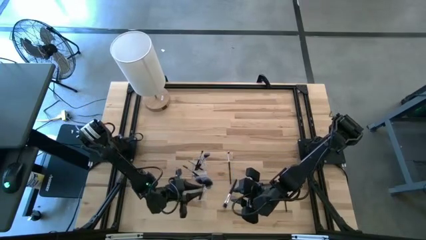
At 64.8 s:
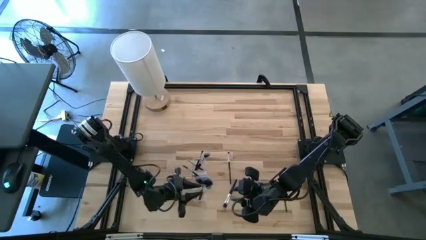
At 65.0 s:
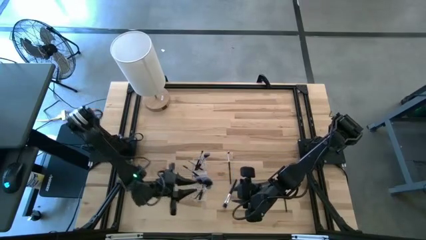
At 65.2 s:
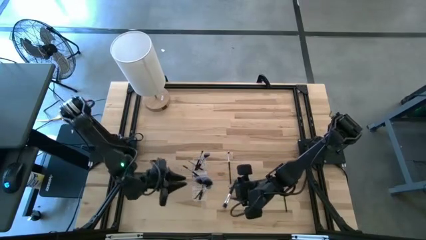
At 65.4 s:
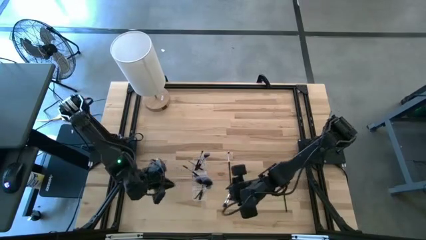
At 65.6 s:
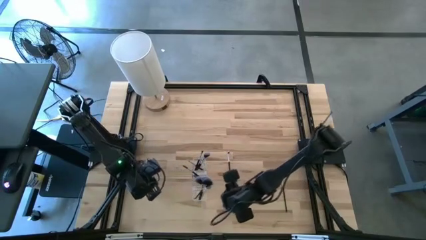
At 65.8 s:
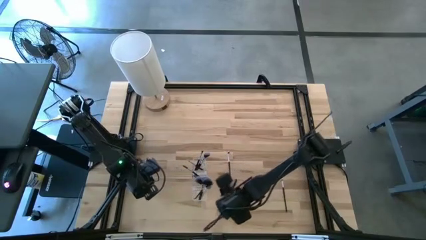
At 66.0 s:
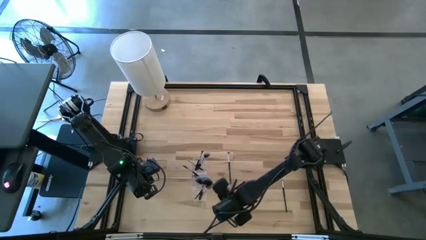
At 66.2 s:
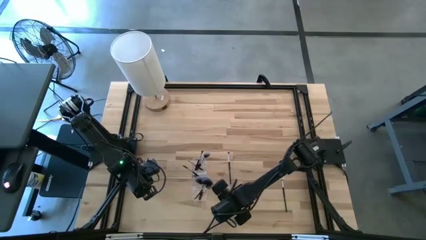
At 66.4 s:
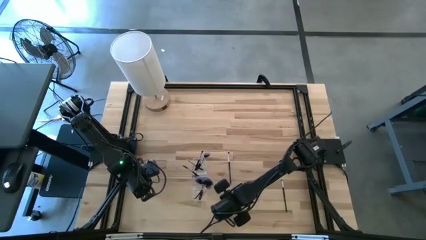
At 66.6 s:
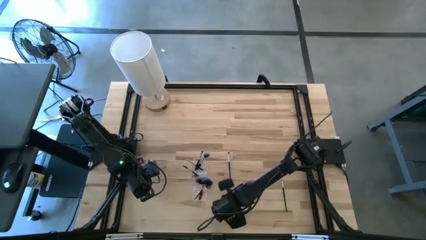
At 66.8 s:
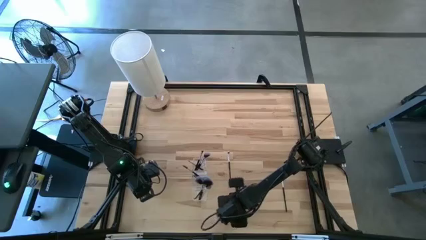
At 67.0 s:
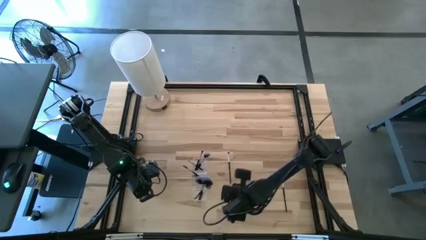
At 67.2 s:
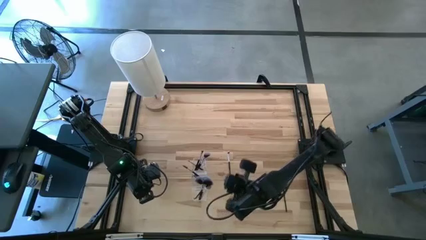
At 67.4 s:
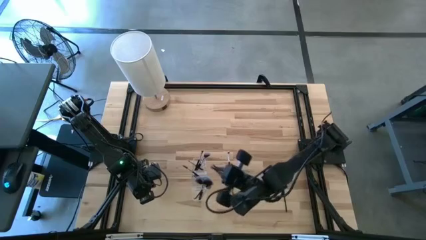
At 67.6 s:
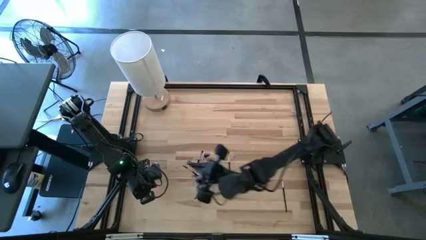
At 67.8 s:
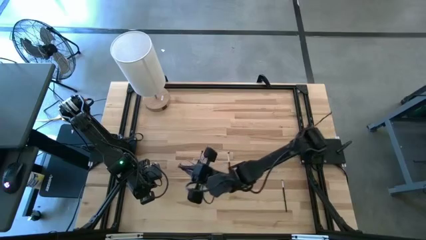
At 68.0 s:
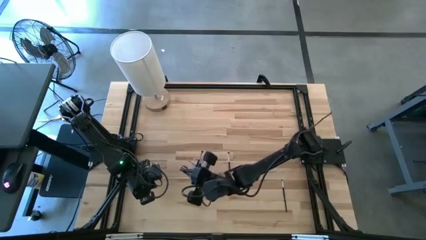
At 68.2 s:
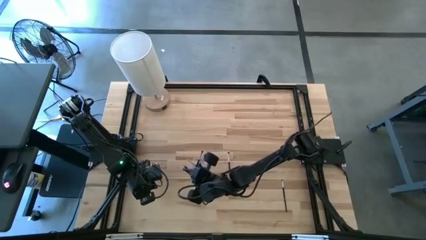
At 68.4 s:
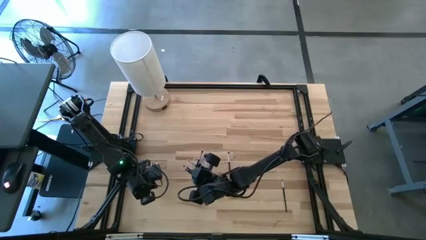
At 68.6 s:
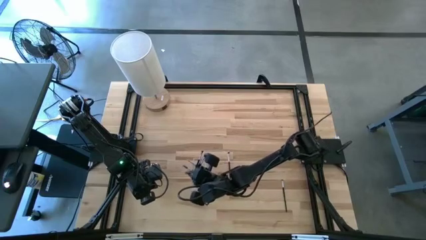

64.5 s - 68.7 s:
Task: Put items in baskets/containers
Put the blush brush into the transparent organizer

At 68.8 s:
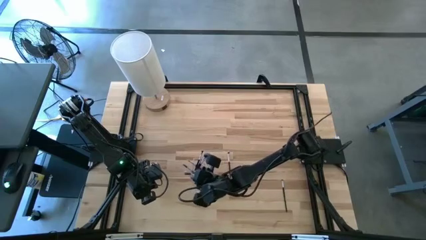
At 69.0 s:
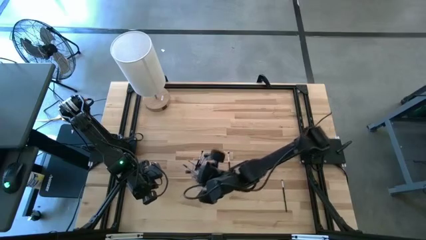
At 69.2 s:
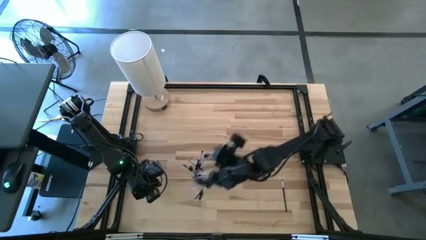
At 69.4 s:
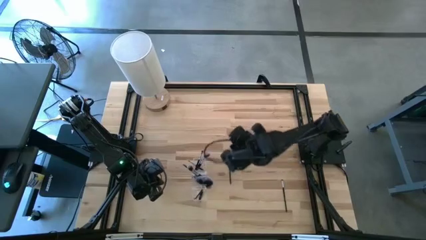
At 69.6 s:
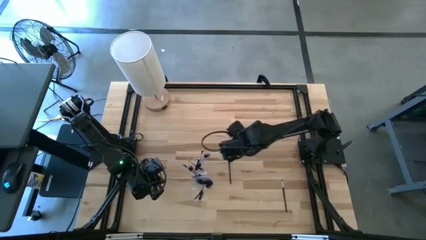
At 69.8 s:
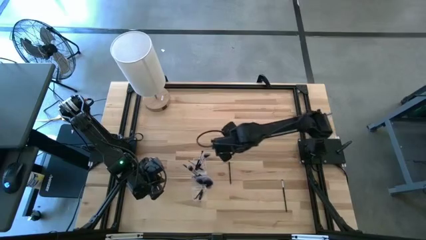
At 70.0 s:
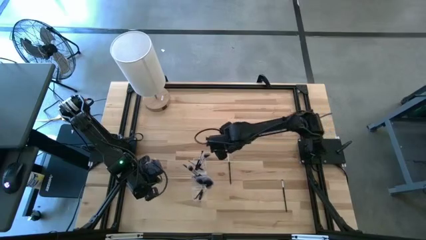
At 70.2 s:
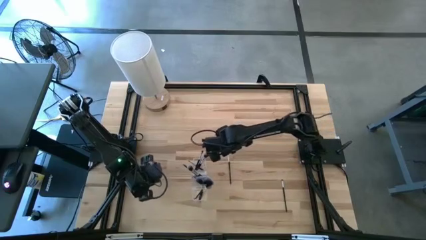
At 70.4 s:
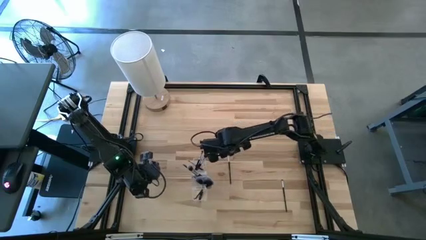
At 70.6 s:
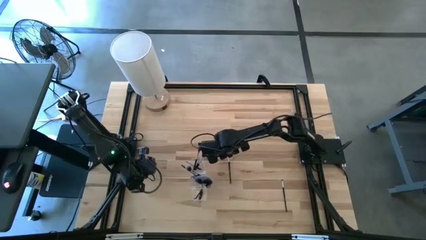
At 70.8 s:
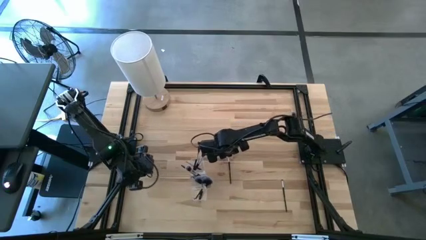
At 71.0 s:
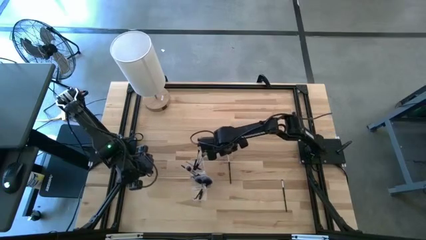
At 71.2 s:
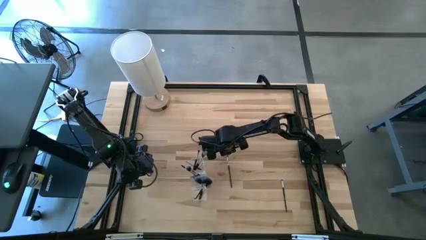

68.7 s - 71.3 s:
Put the foundation brush into the transparent organizer

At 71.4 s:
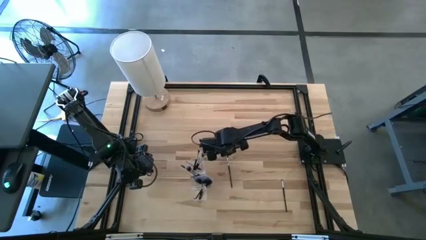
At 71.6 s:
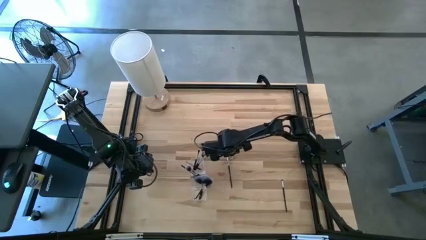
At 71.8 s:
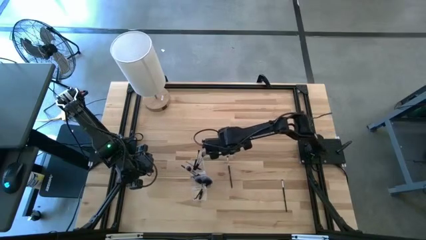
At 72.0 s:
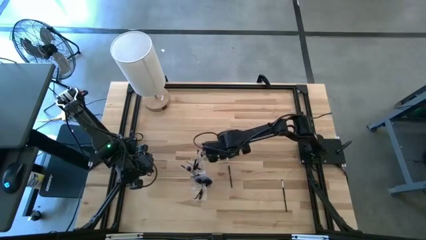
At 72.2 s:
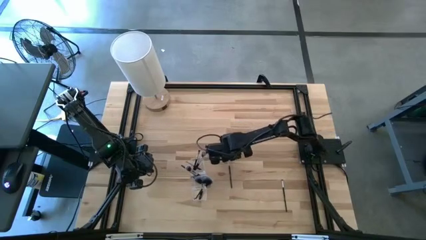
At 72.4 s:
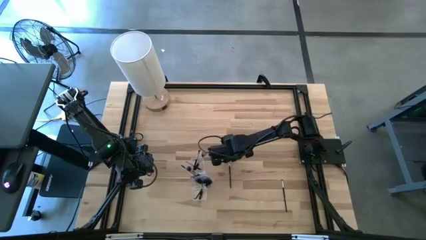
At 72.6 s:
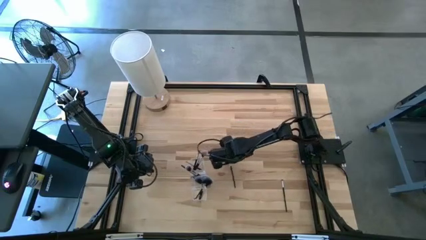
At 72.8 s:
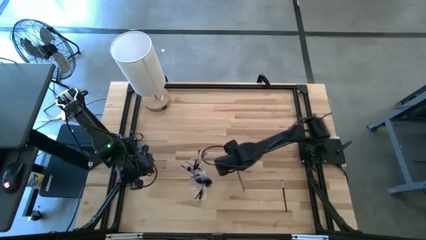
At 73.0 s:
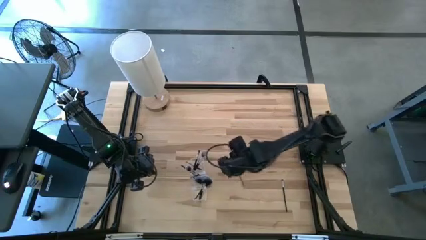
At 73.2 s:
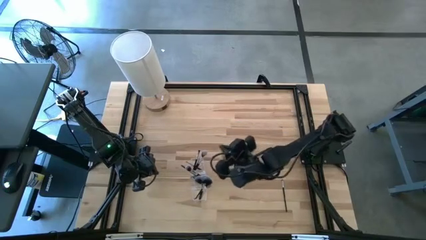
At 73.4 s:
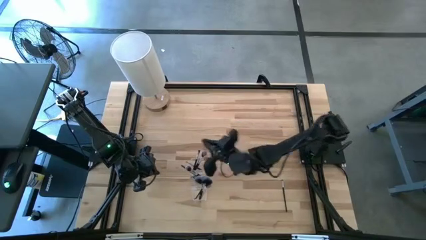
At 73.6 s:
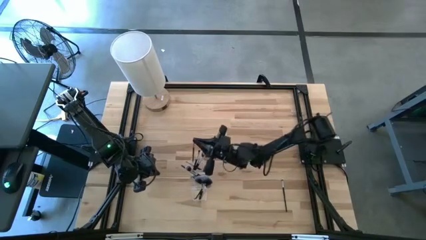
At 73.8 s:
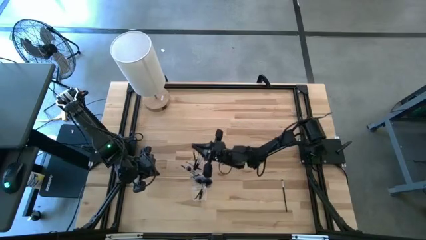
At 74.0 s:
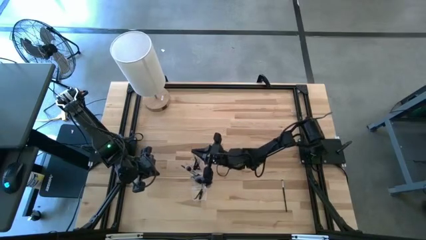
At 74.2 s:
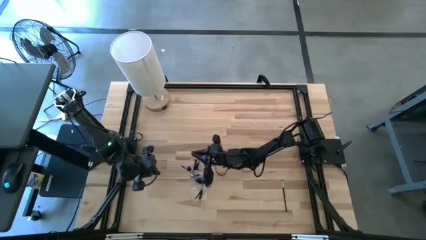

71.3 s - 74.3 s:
Put the foundation brush into the transparent organizer

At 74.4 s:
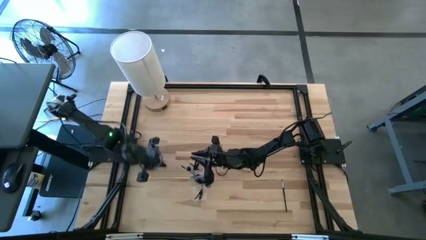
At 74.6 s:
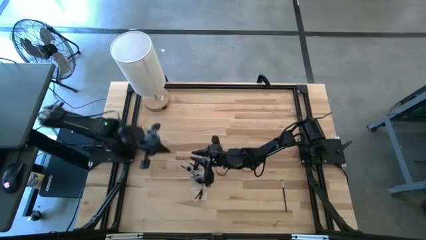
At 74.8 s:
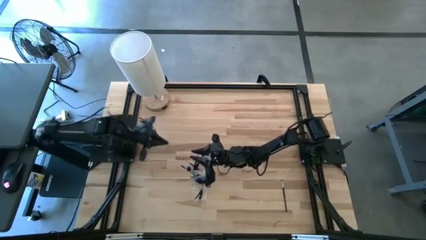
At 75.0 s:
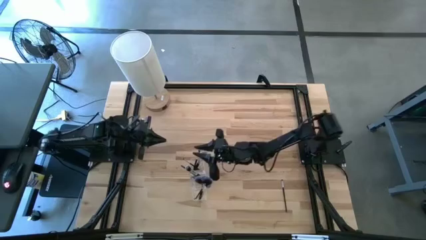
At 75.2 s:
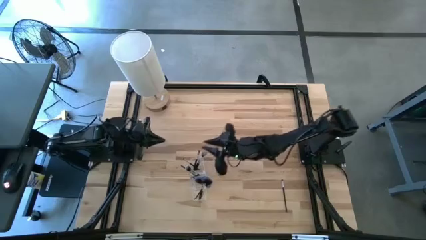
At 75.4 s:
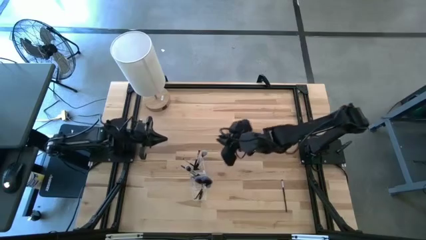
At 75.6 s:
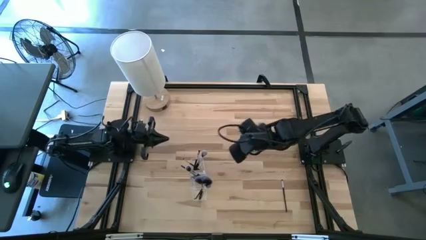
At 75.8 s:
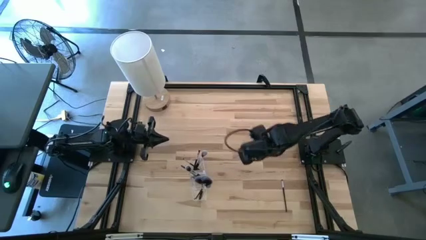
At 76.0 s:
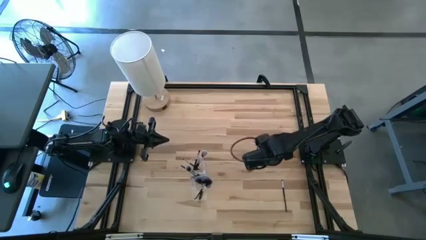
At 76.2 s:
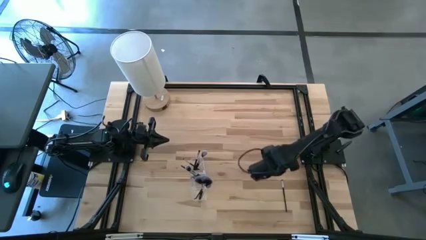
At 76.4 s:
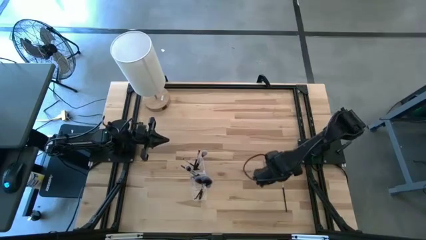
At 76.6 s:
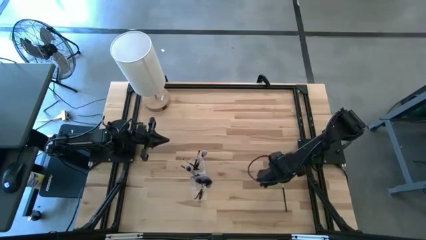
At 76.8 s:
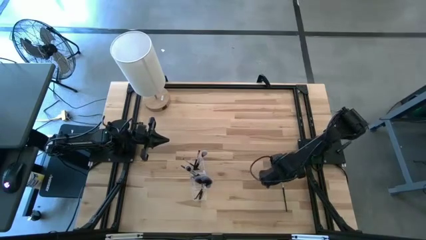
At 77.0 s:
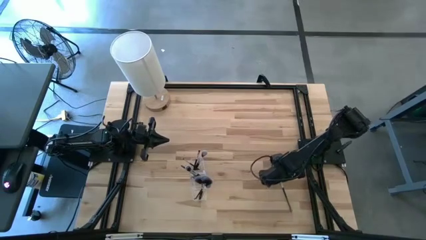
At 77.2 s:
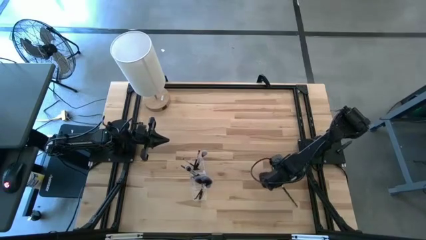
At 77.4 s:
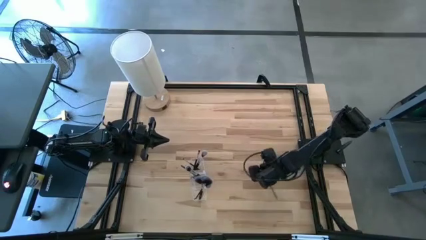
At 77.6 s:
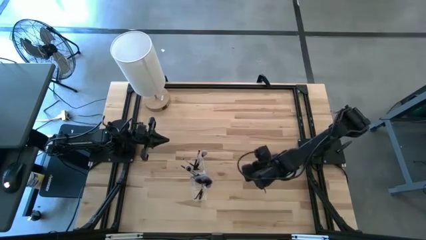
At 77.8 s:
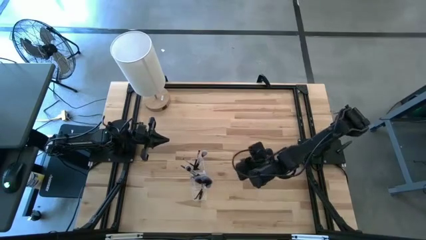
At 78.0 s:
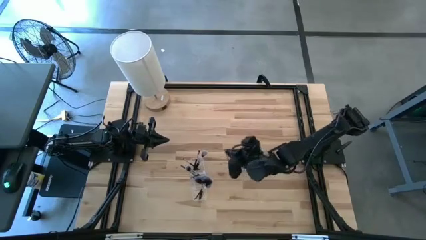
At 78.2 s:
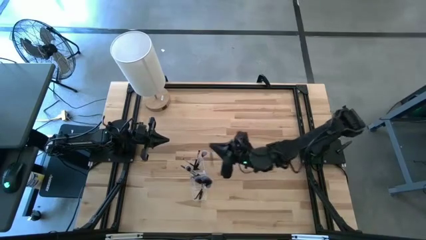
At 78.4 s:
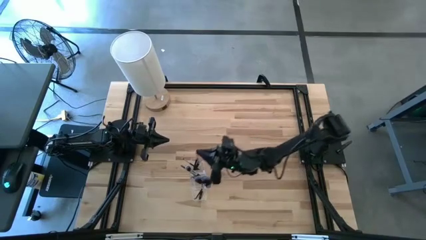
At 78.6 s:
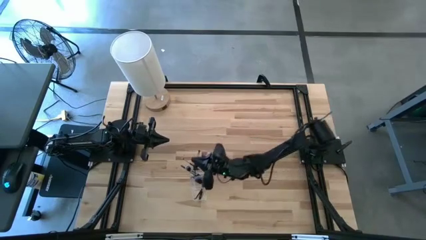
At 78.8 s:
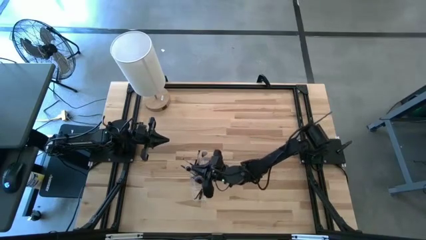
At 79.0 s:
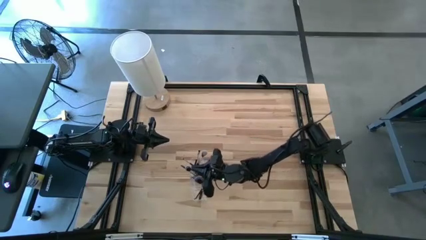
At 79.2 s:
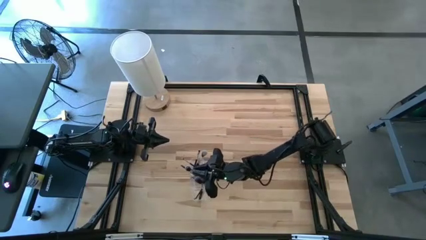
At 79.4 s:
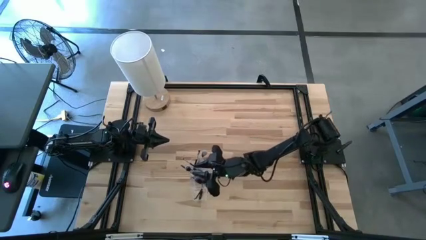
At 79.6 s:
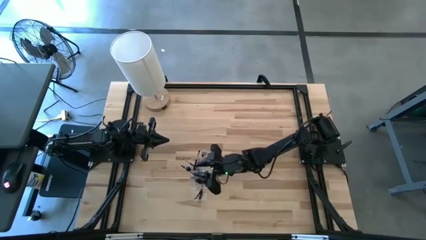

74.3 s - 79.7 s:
Put the foundation brush into the transparent organizer

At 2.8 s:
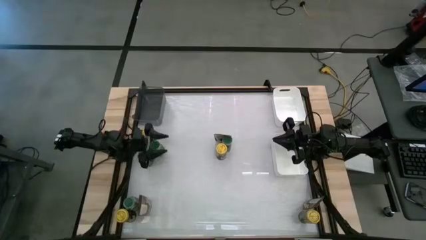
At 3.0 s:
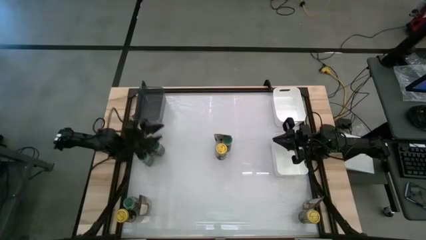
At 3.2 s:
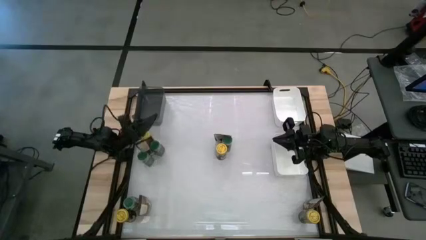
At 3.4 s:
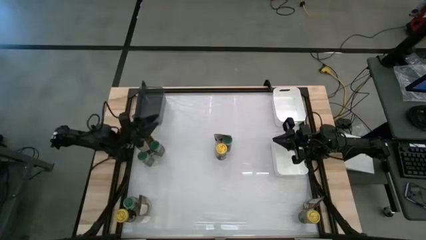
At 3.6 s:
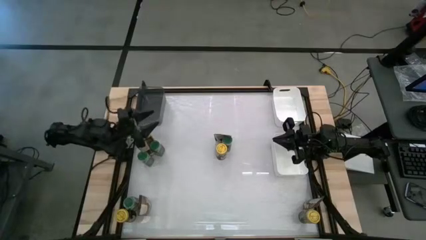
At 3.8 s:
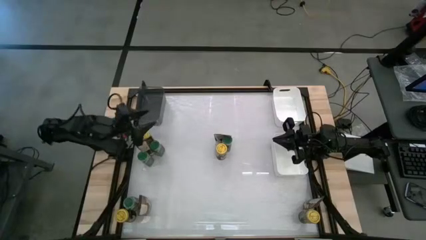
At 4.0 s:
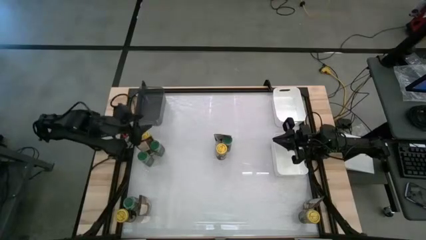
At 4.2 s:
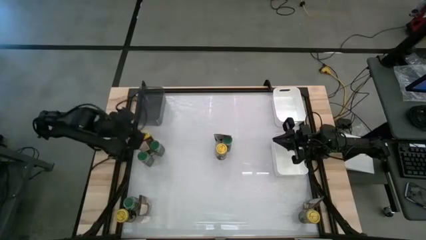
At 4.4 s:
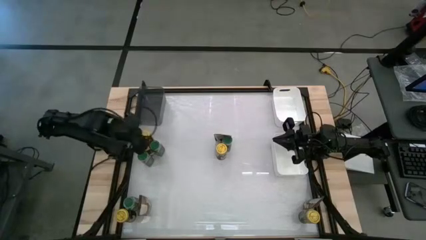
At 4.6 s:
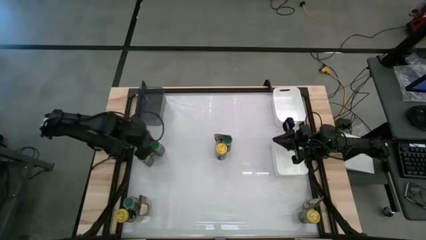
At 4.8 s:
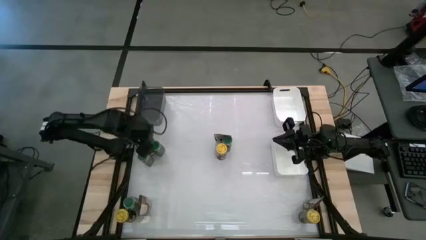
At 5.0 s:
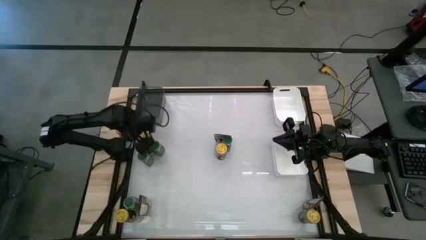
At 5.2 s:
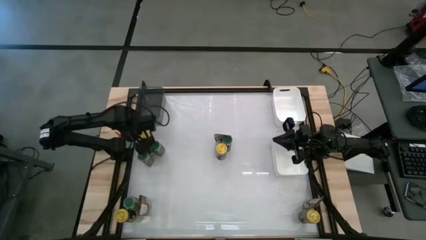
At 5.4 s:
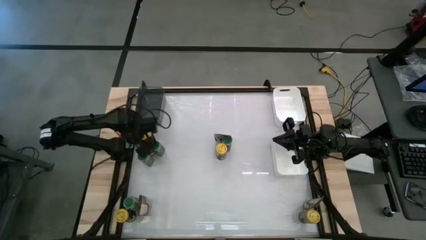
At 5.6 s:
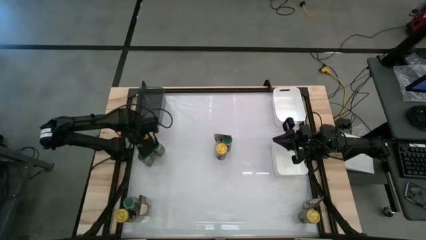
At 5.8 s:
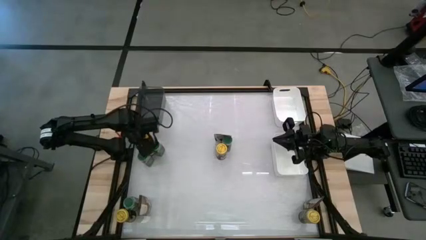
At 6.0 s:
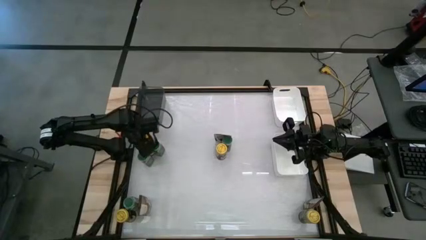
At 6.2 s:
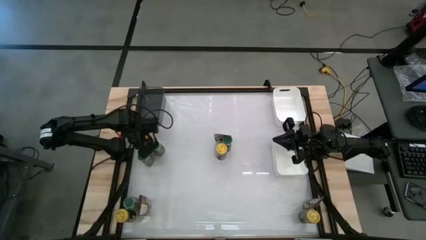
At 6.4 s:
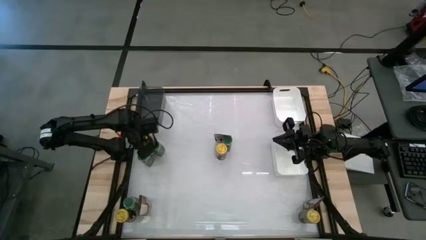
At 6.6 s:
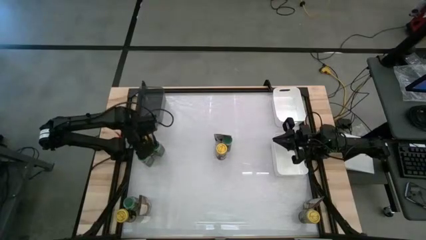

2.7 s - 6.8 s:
Task: Sort spices by type
Put the orange seasoning bag into the black bin
